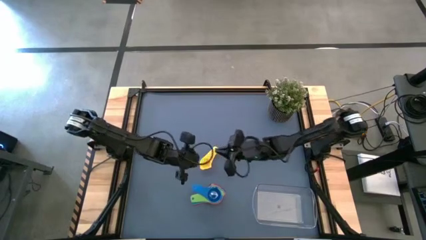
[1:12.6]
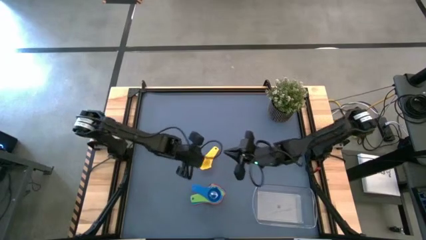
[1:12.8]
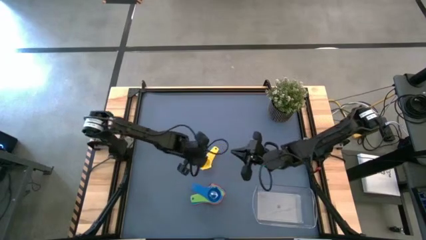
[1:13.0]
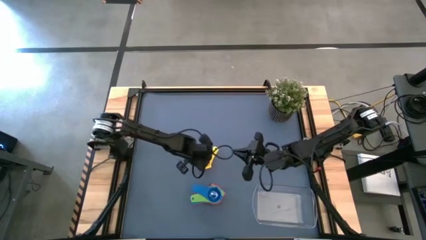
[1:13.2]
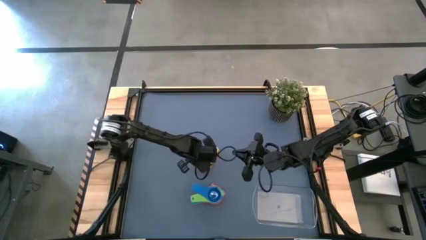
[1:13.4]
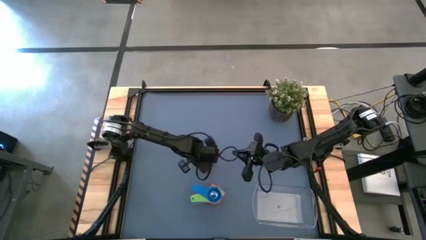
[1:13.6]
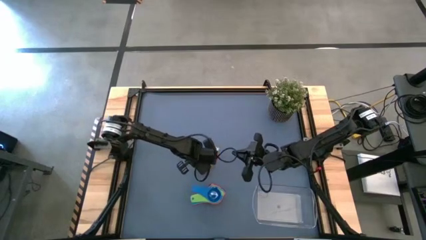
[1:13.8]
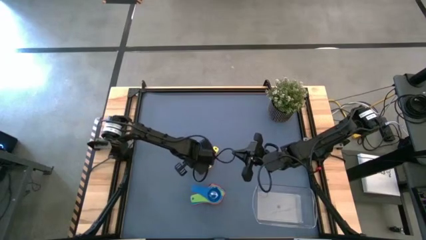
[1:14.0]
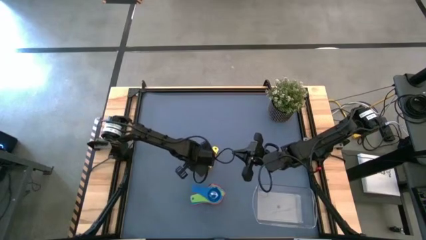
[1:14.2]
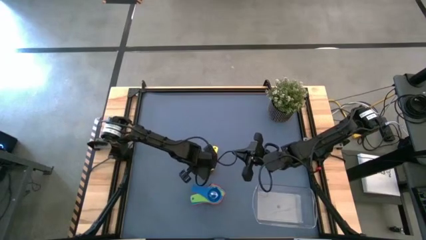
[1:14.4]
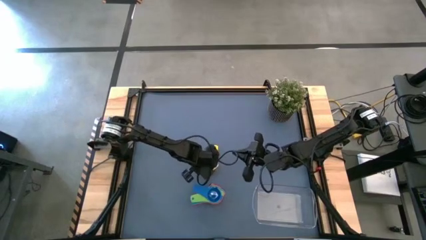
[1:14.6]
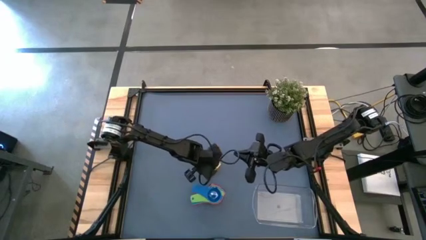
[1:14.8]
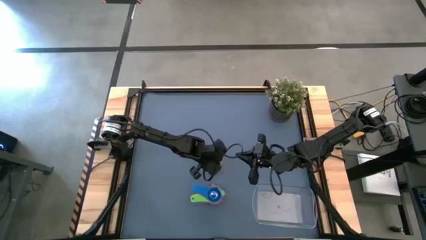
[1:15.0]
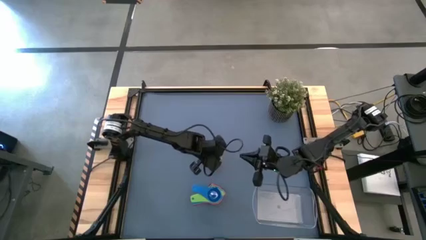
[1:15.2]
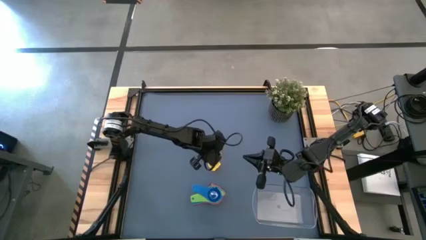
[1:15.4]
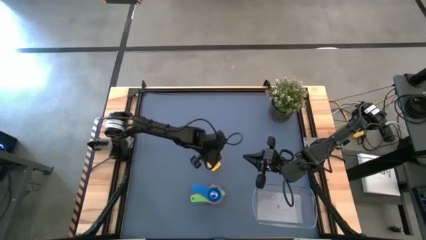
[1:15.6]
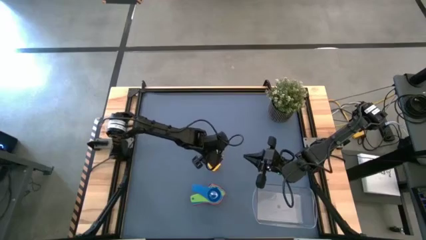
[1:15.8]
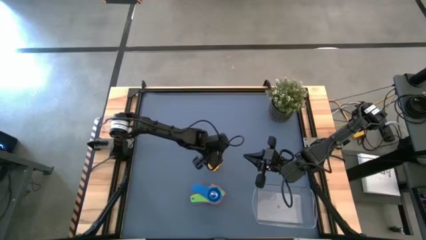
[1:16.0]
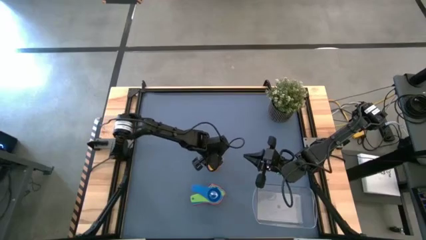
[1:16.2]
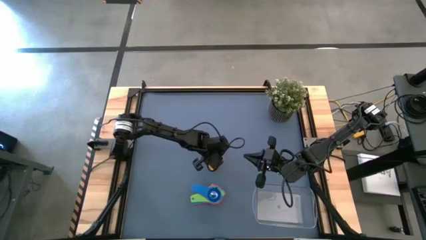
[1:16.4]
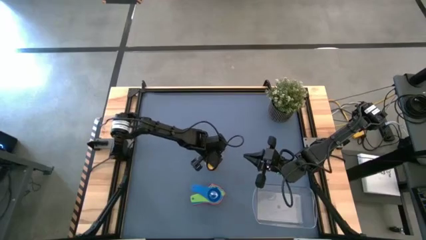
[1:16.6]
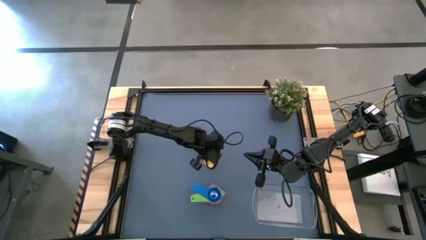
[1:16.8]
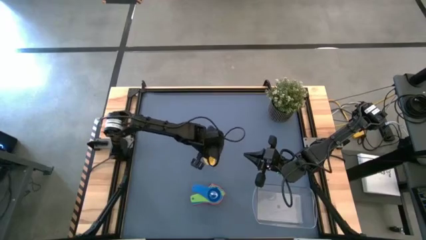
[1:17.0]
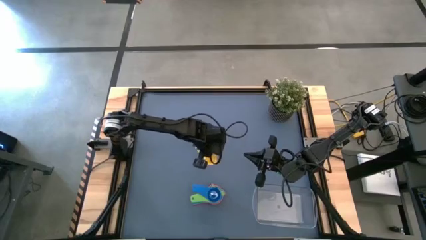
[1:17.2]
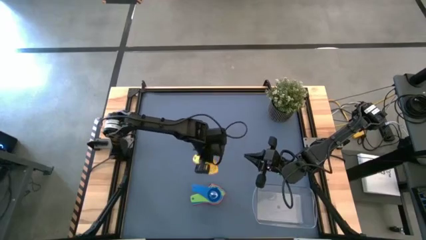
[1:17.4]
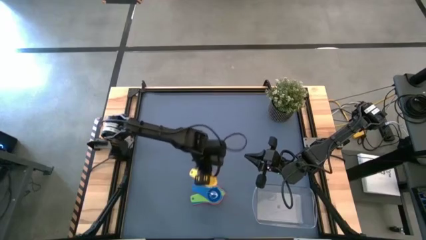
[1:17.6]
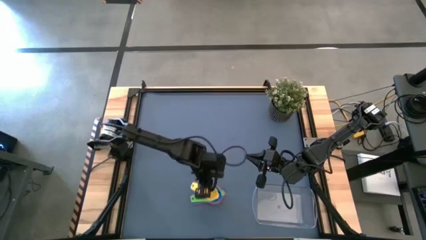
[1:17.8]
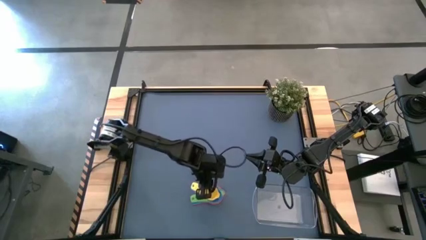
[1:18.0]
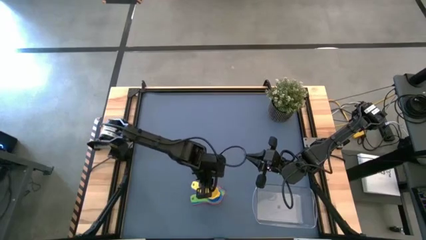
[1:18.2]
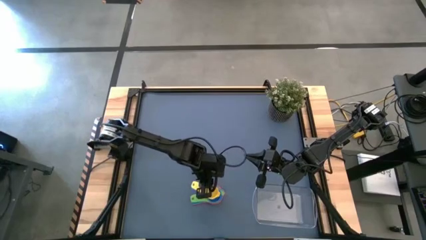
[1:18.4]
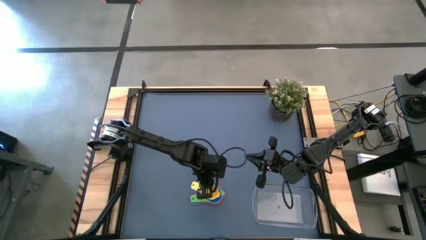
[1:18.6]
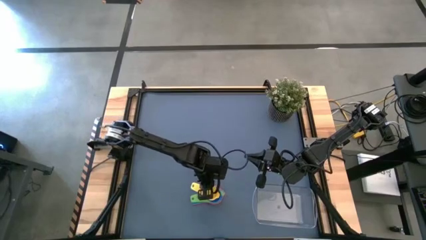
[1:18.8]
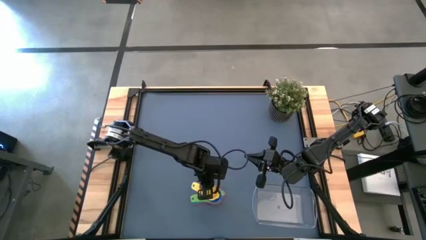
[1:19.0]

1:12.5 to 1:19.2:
Task: Nest measuring cups in basket
Stack the yellow measuring cup on top of the blue measuring cup

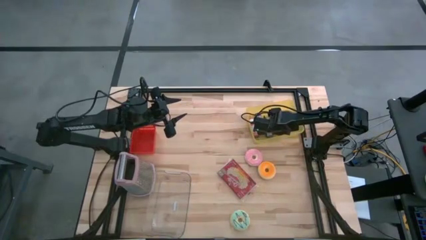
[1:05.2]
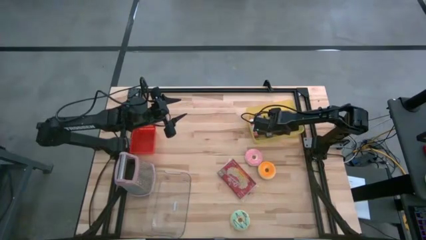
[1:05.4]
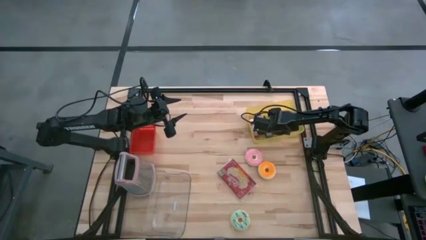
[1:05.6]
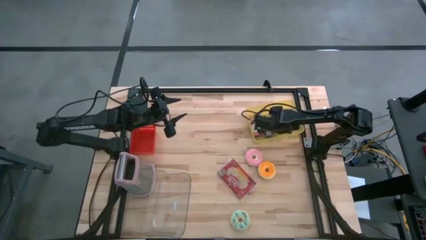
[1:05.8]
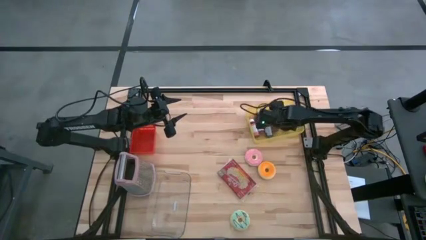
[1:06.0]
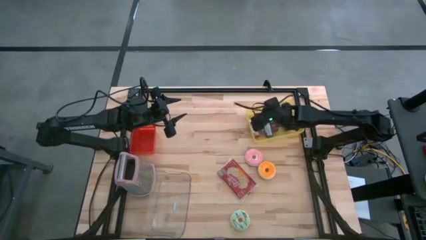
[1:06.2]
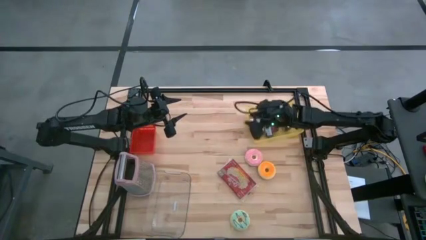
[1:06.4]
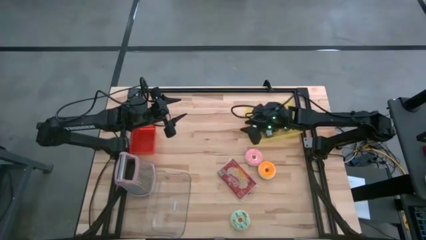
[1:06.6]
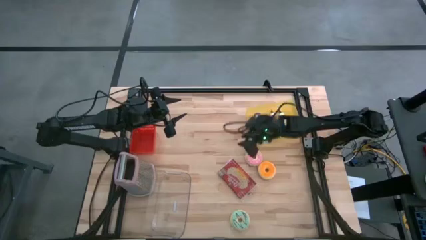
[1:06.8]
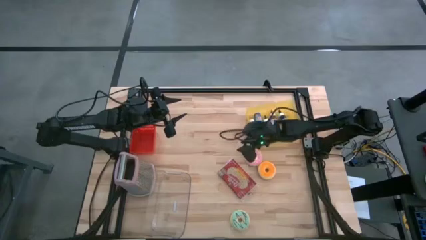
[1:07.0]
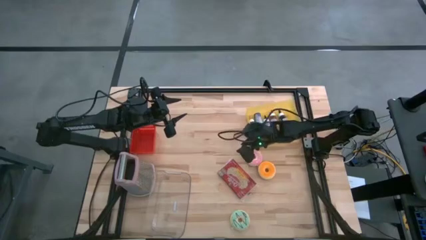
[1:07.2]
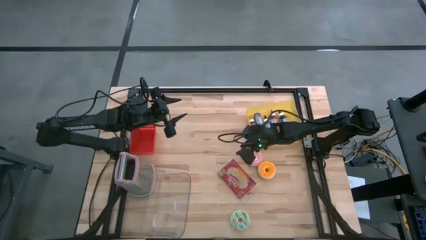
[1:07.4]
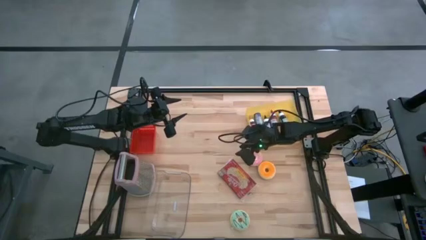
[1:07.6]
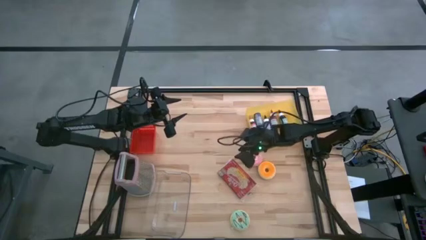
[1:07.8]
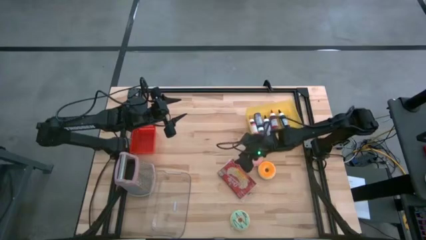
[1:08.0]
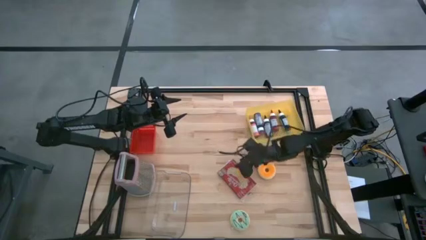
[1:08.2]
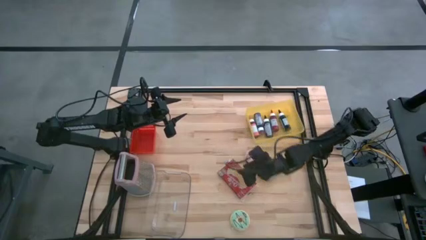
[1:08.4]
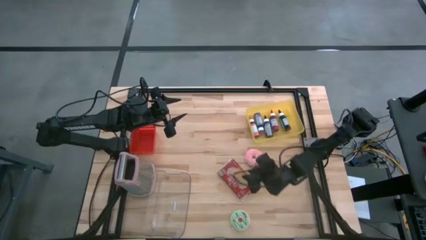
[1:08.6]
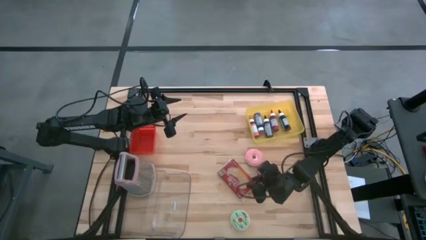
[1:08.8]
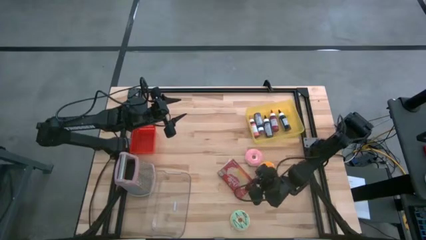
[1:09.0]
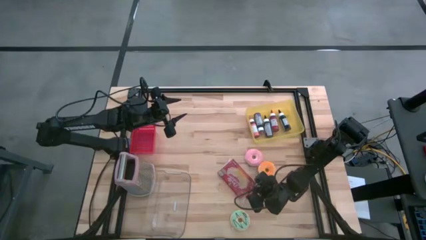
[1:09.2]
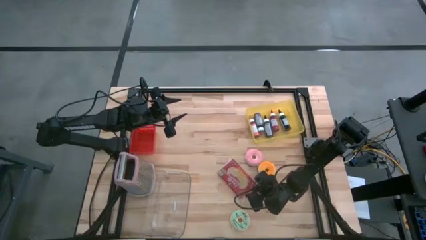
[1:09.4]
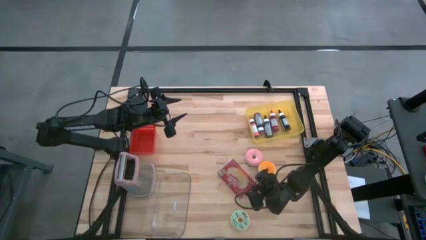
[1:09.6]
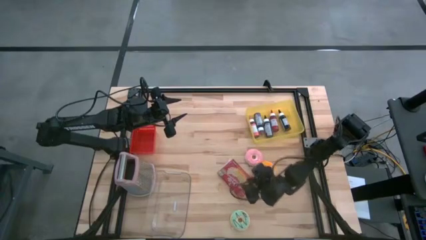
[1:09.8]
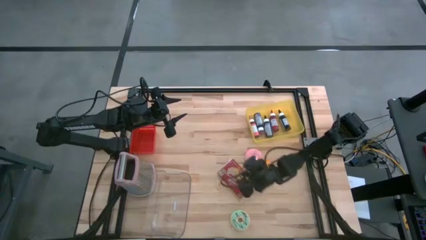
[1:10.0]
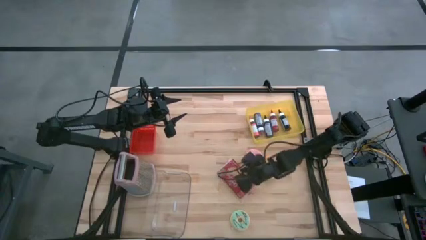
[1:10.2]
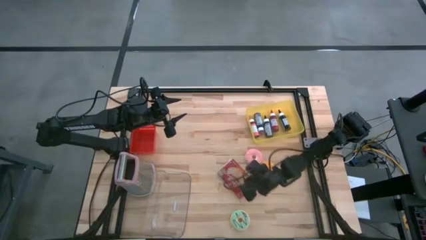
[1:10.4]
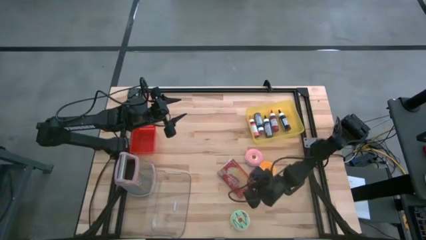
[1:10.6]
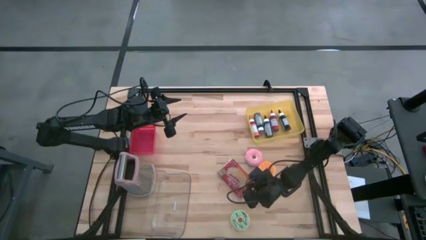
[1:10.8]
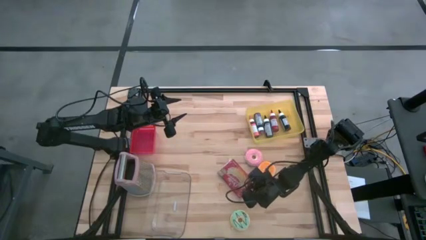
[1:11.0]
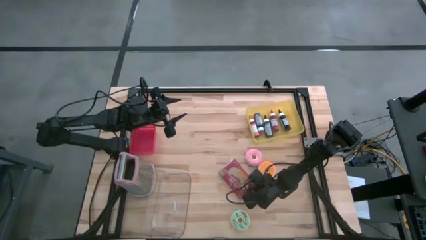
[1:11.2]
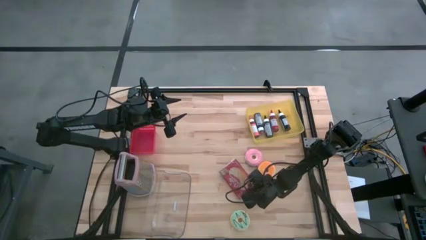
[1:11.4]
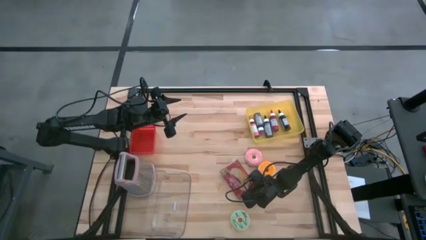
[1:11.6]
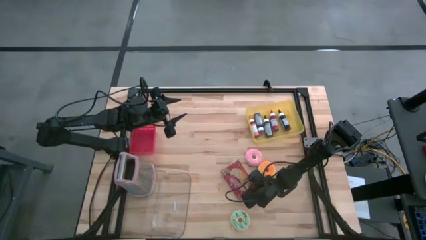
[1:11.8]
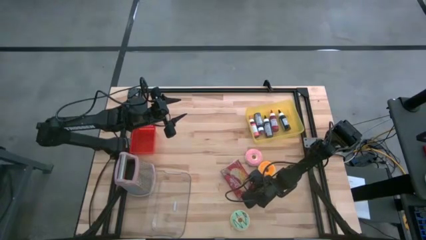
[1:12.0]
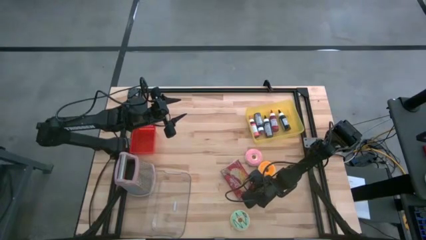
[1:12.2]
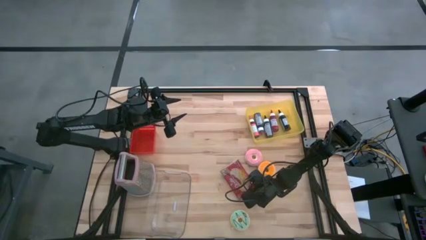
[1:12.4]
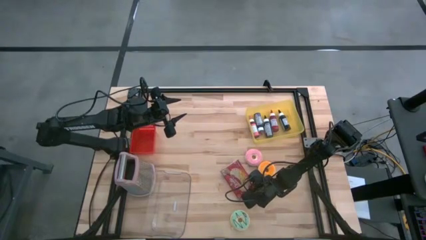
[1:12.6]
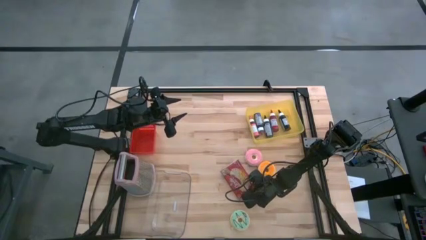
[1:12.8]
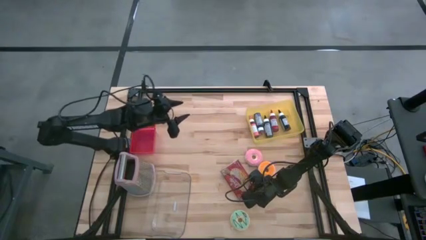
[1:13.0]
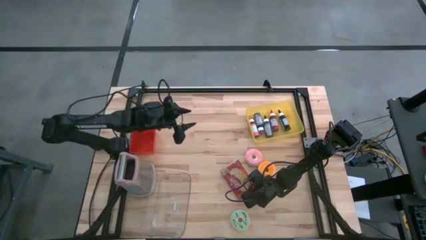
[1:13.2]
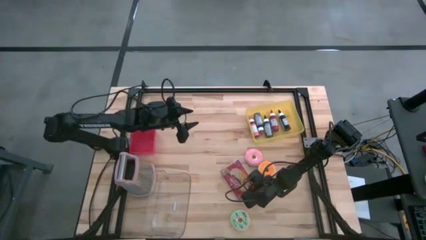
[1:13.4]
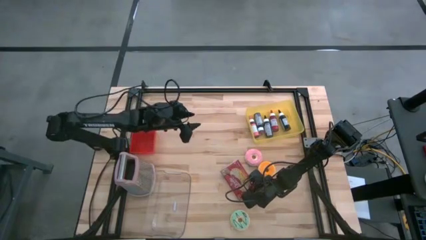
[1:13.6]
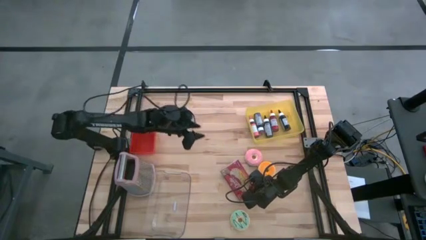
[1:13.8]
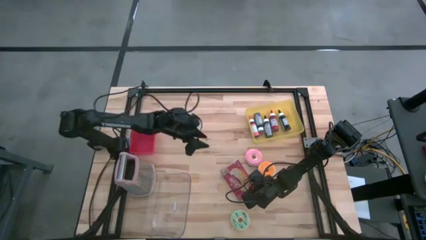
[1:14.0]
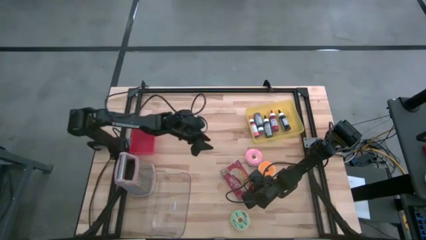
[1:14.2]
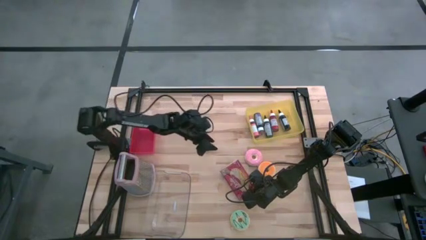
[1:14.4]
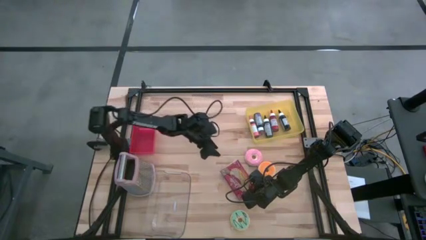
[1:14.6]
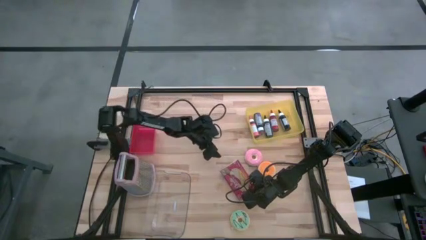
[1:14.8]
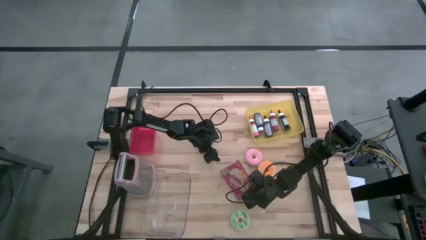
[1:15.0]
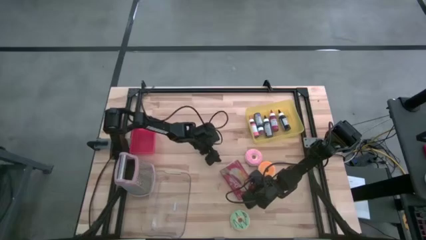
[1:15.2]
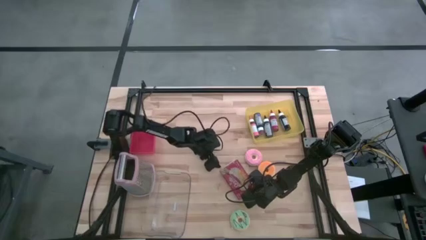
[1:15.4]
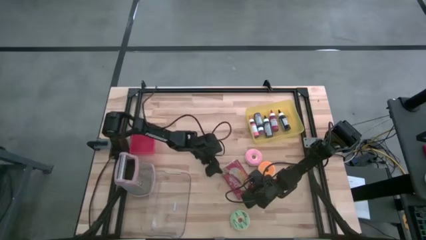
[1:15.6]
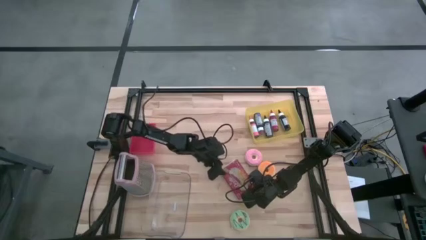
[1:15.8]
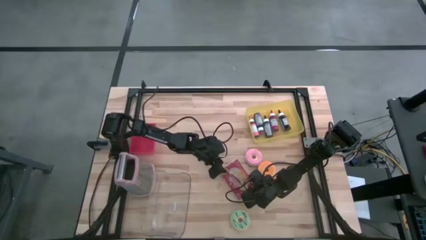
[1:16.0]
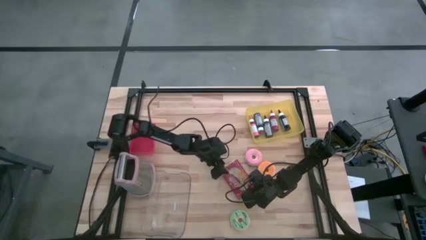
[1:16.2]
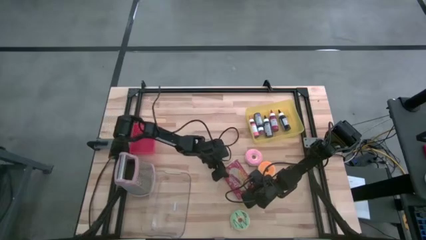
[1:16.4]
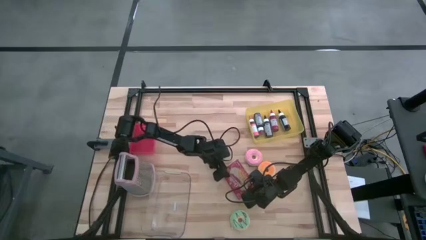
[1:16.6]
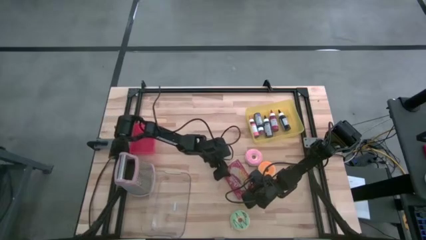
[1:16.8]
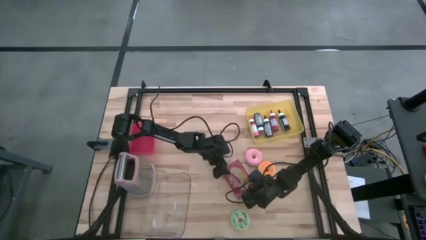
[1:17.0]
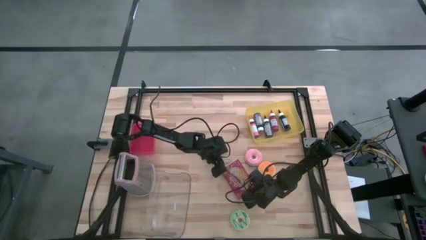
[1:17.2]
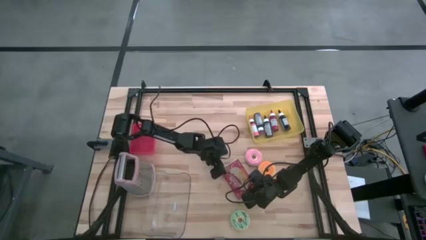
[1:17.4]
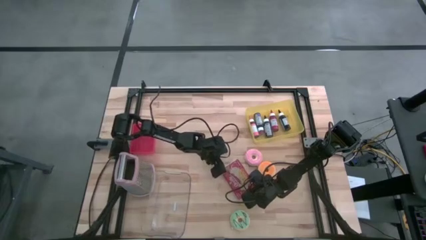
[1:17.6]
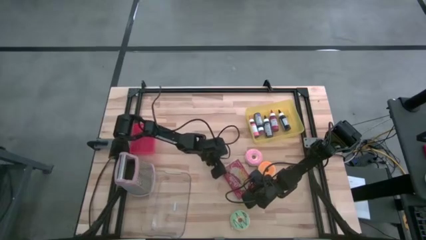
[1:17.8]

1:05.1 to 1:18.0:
Task: Pick & Place Food Item
Put the popcorn pack into the transparent bin
